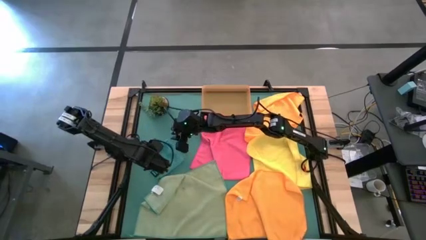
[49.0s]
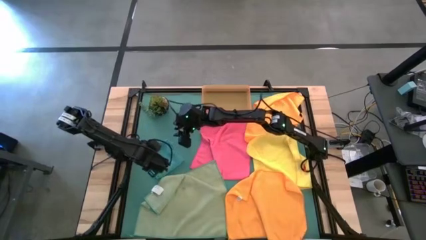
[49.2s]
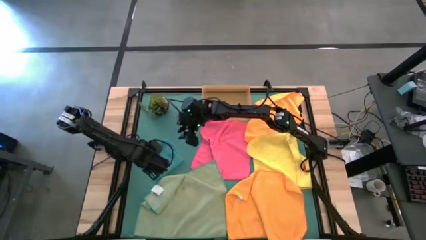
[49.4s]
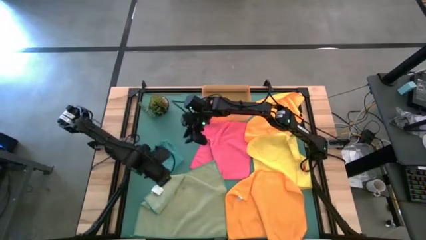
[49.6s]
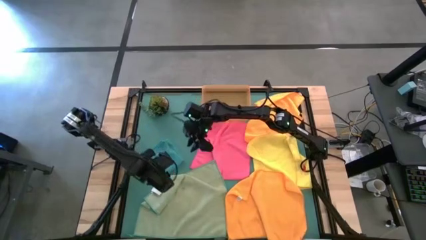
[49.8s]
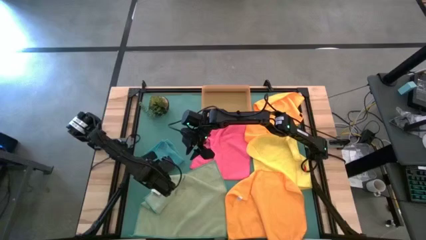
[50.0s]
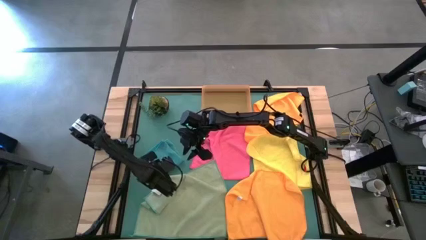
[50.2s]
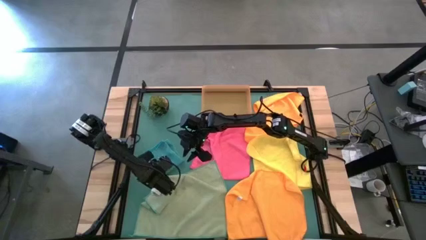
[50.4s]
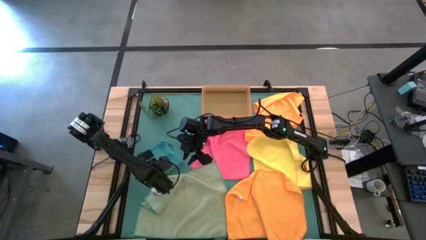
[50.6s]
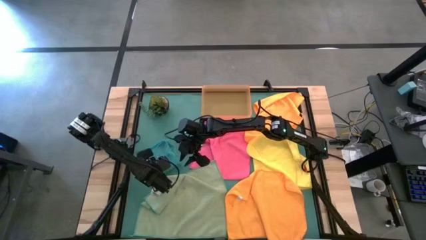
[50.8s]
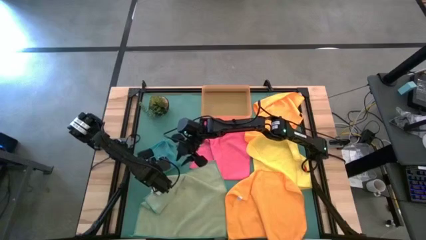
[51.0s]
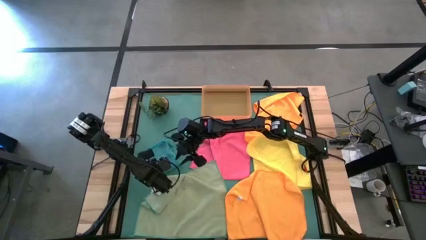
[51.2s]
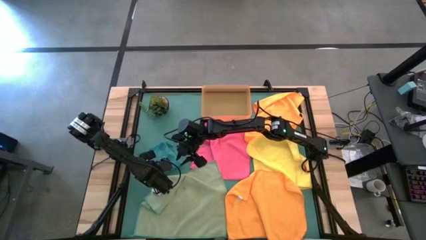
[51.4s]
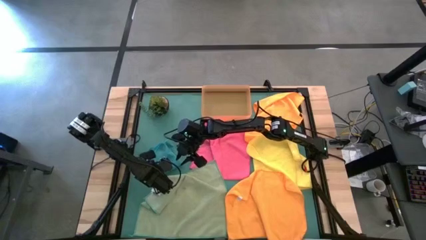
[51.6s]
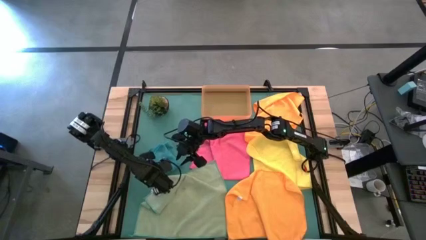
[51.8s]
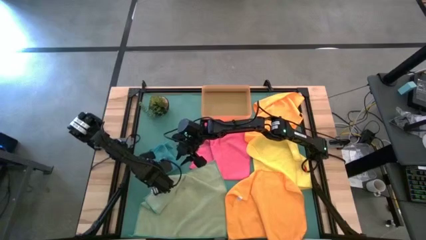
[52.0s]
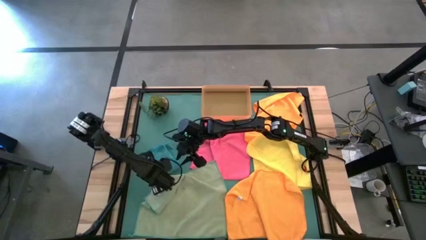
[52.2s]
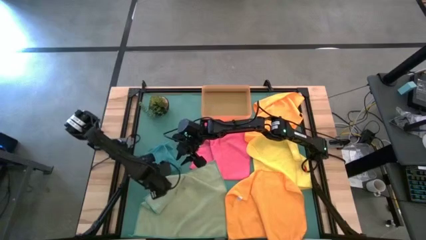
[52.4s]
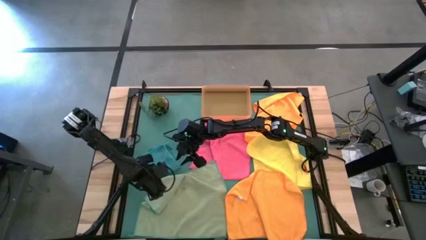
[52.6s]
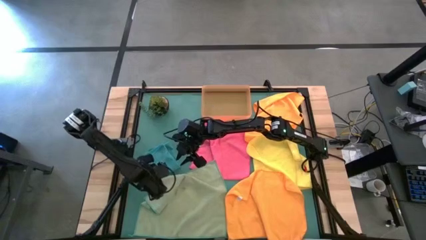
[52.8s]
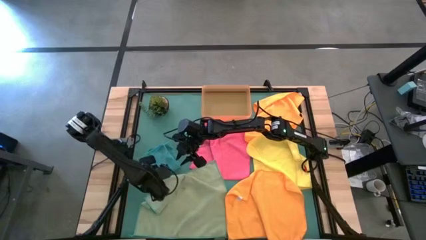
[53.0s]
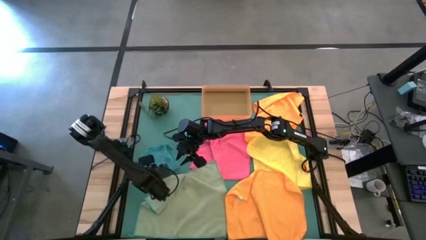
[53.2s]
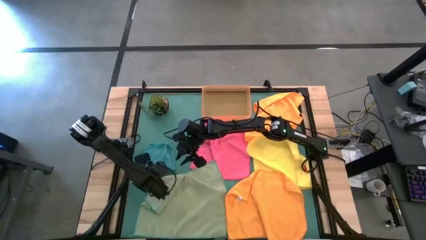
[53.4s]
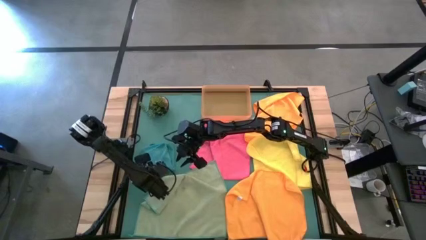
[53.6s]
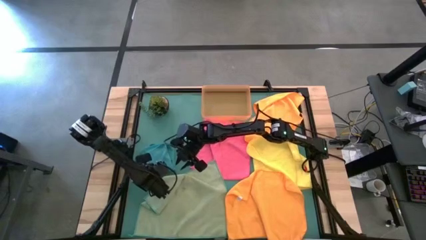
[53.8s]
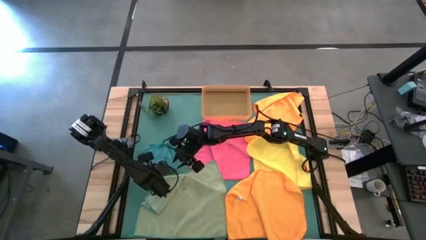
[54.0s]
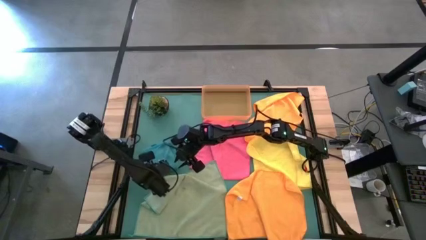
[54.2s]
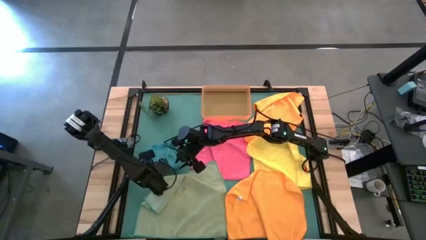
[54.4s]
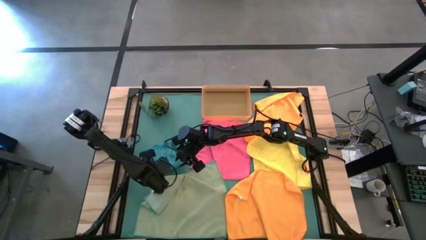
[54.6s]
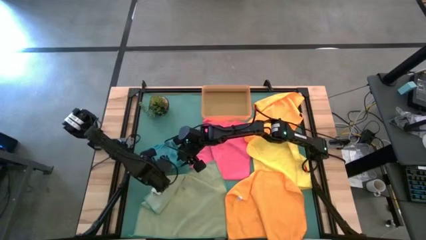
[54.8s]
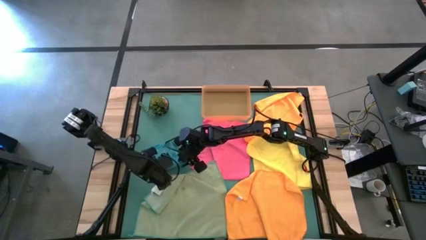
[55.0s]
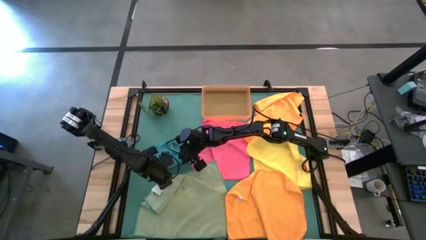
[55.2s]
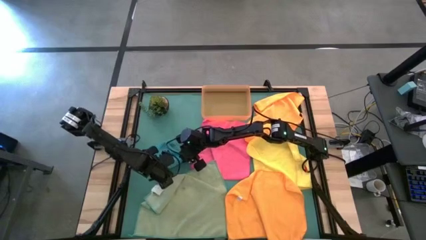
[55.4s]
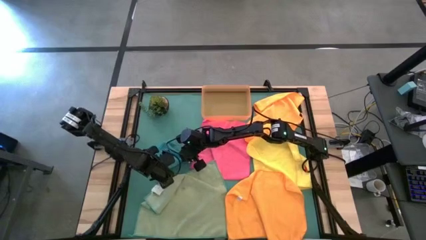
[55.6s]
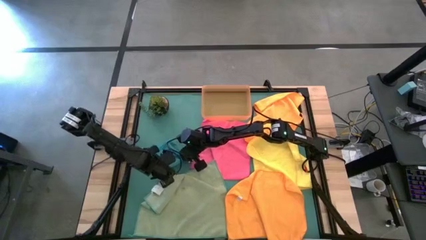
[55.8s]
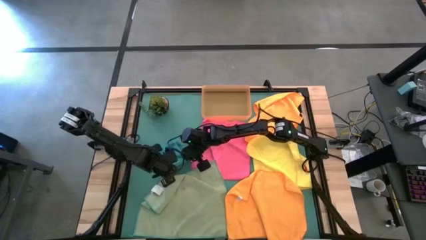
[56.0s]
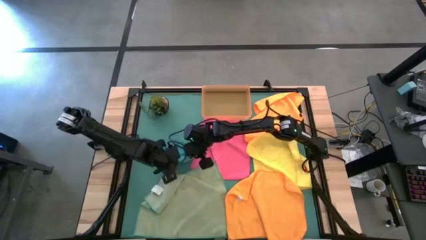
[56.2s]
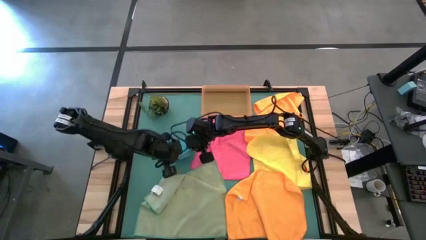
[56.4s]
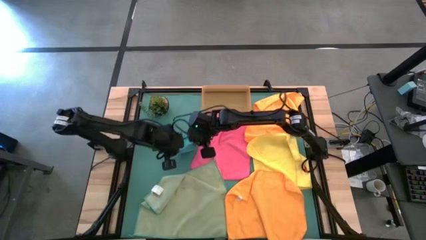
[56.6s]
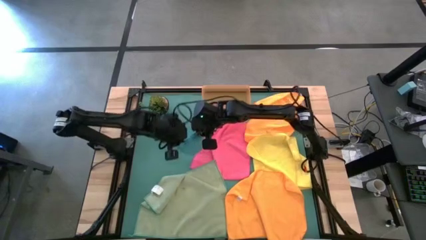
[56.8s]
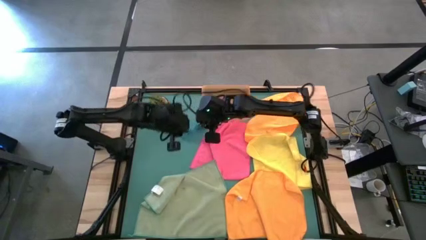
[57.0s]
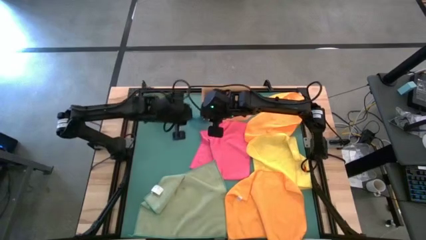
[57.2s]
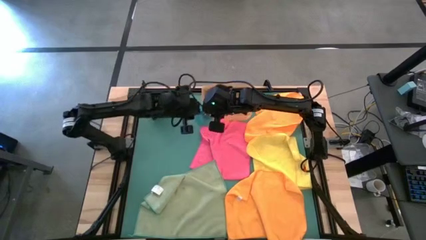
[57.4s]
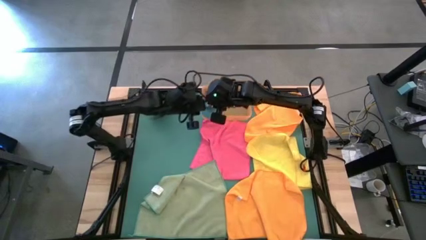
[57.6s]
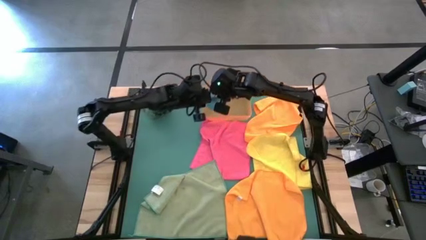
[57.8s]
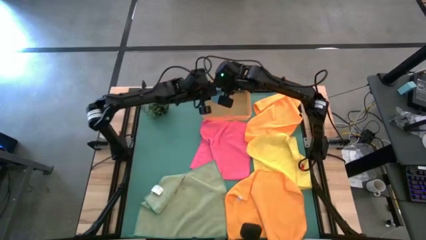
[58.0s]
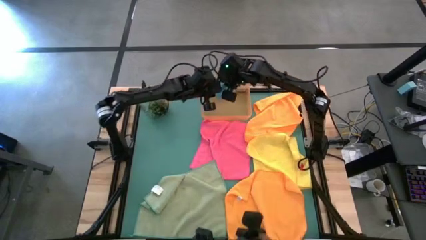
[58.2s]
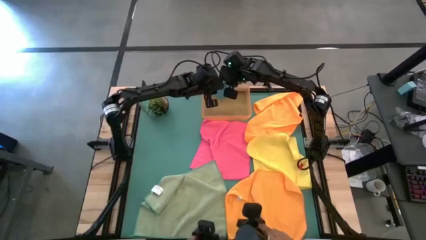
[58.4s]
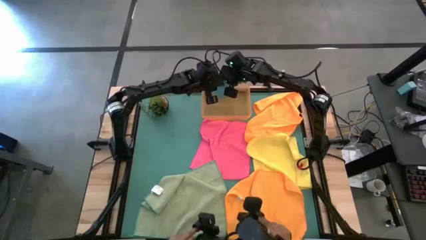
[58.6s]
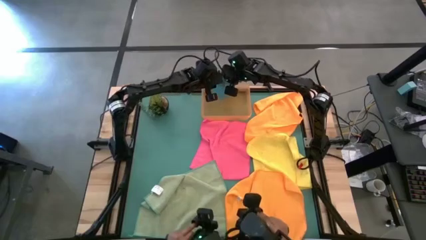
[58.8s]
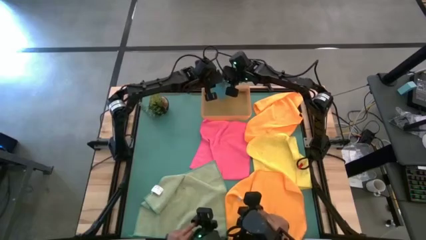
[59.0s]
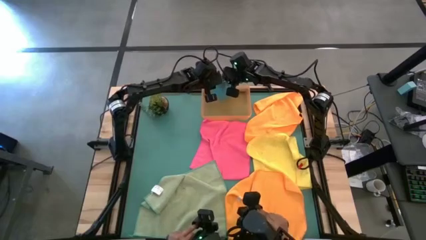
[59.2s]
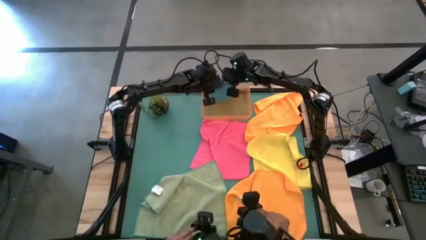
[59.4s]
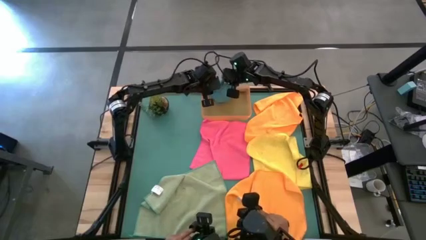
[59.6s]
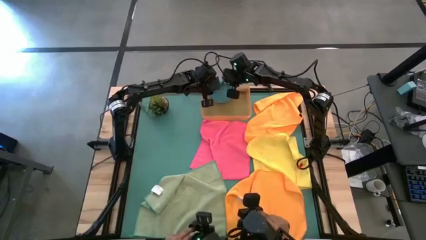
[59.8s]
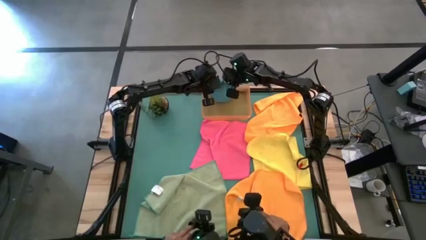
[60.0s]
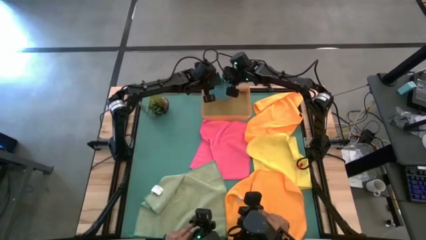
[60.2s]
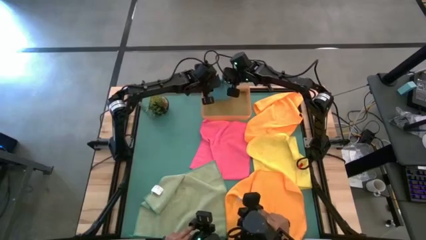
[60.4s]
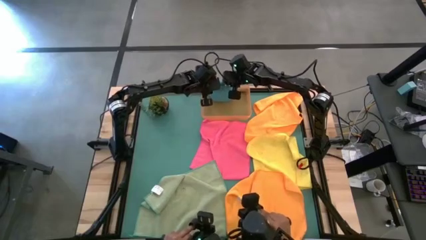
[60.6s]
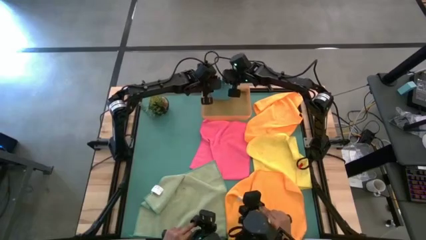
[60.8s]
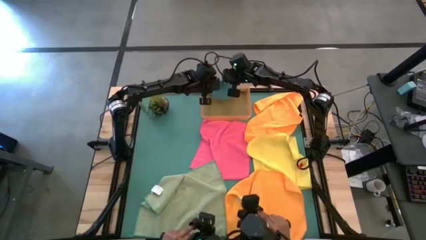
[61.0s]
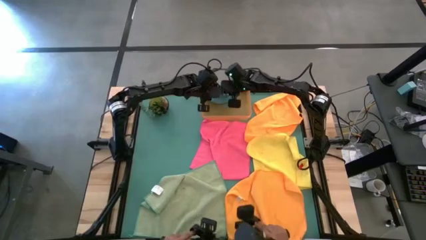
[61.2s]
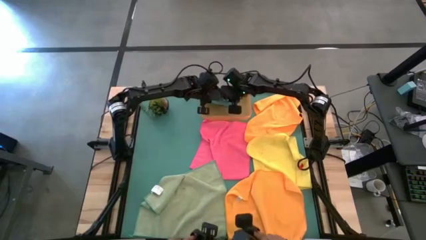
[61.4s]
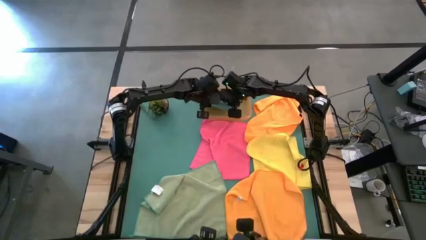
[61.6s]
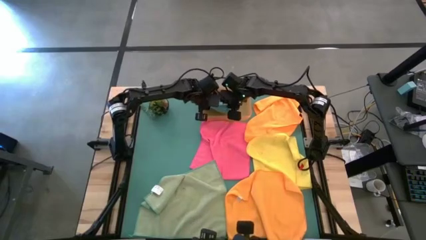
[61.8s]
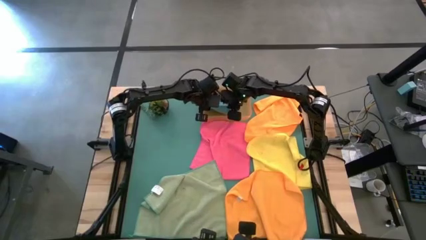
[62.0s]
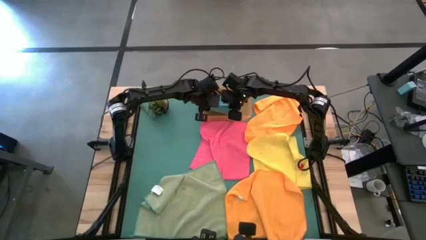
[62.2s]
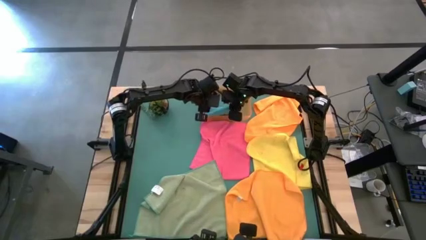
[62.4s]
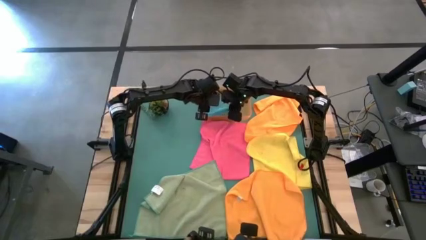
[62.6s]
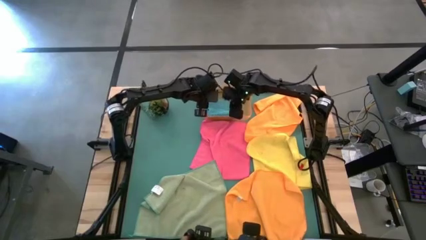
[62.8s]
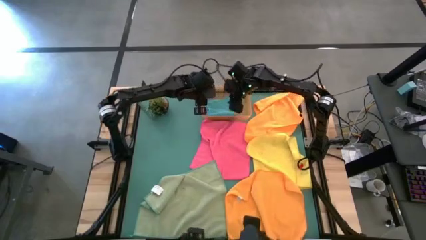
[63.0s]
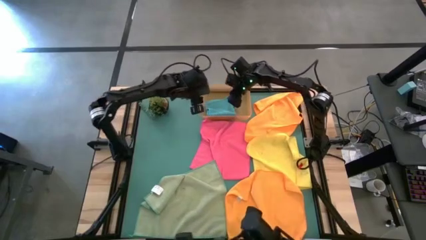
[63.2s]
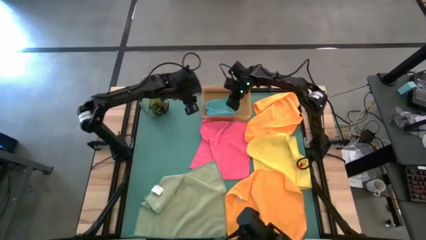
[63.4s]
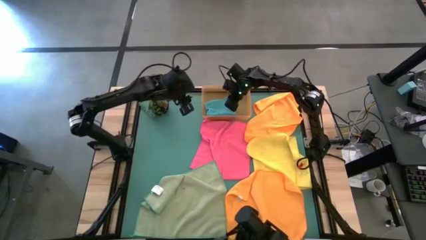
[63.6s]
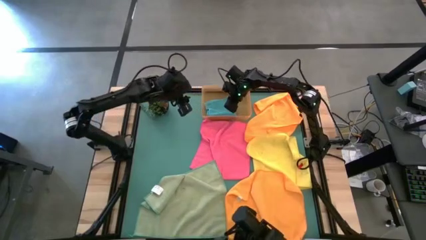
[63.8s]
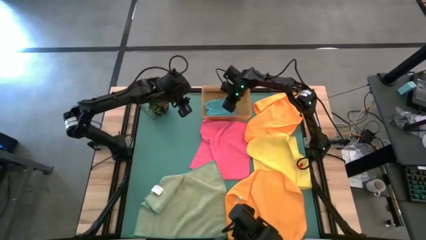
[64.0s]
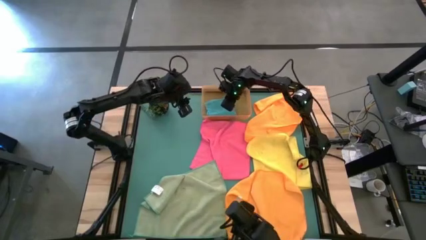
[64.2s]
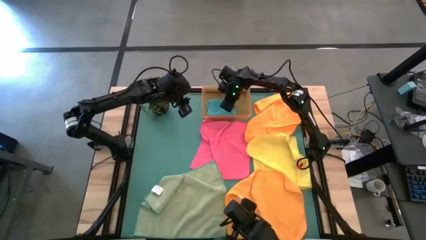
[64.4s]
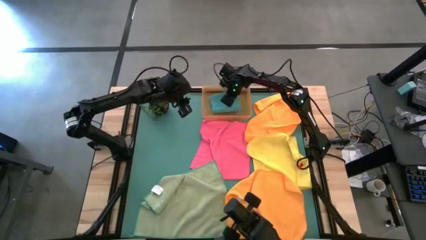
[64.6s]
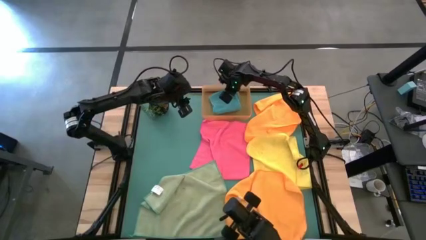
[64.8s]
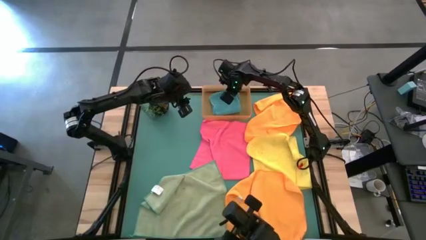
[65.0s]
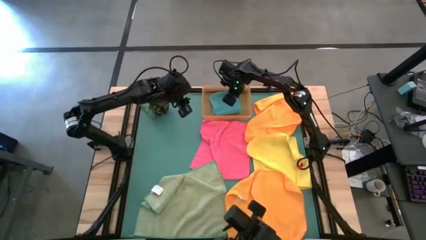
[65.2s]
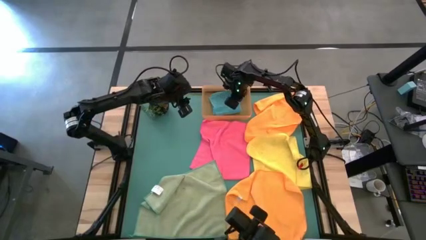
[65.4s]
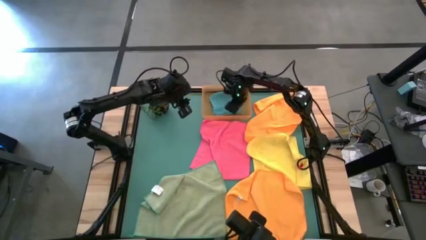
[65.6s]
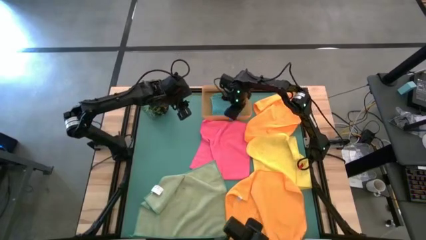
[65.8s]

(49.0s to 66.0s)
Task: Fold microfiber towels
Put the folded blue microfiber cloth into the orange bin
